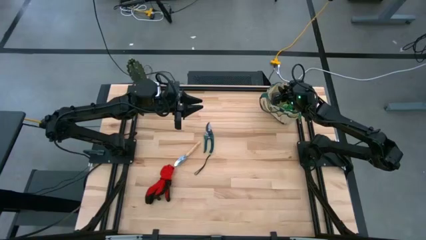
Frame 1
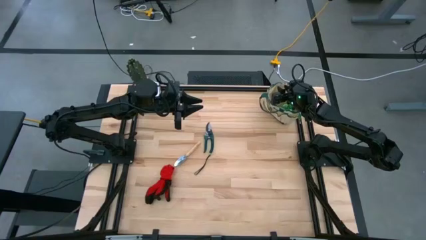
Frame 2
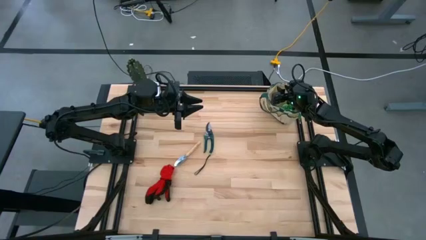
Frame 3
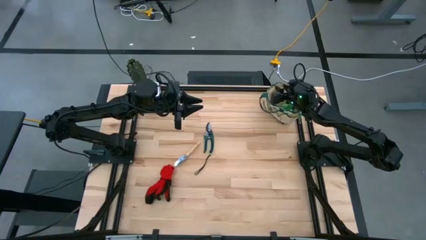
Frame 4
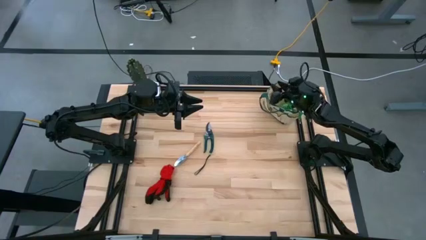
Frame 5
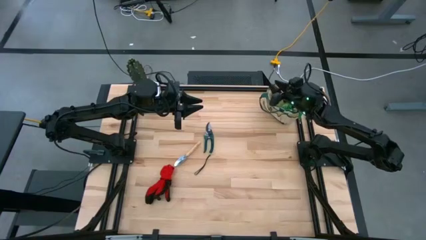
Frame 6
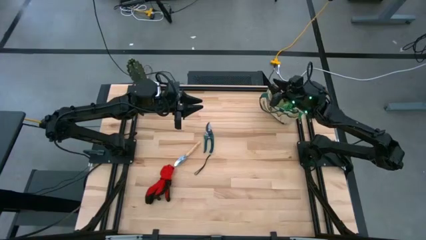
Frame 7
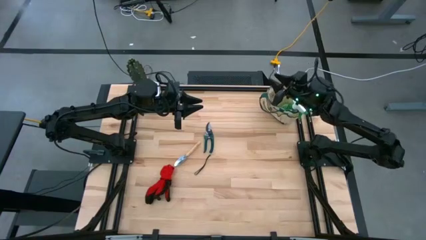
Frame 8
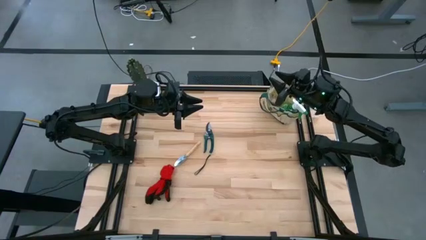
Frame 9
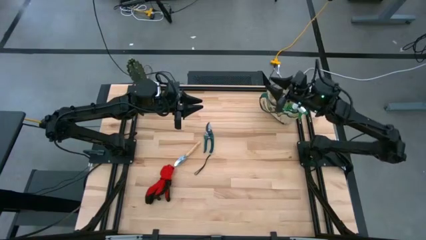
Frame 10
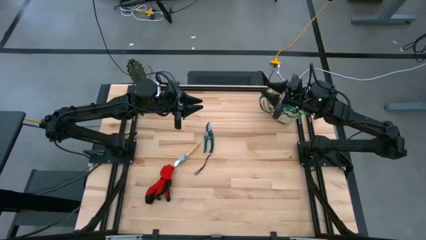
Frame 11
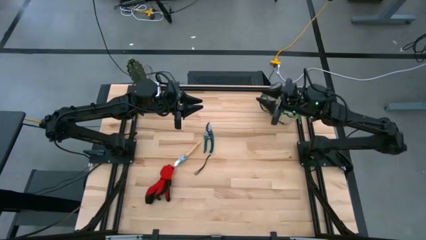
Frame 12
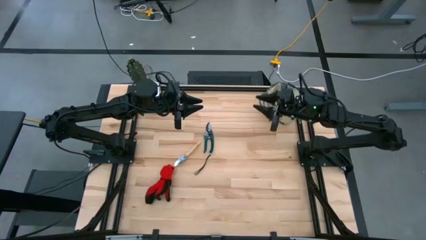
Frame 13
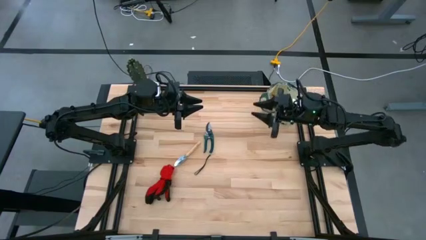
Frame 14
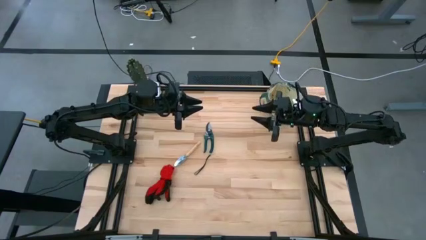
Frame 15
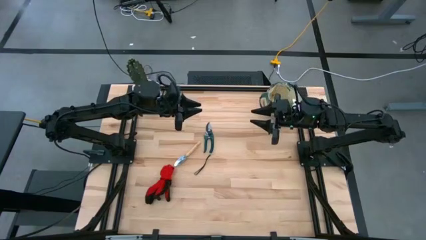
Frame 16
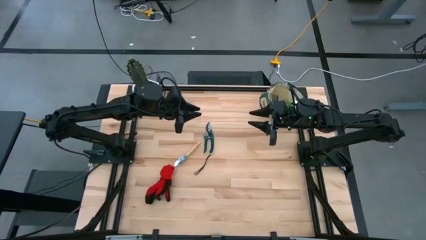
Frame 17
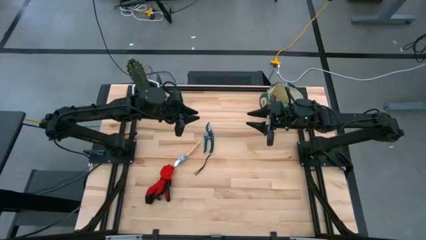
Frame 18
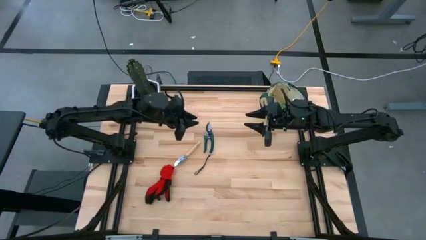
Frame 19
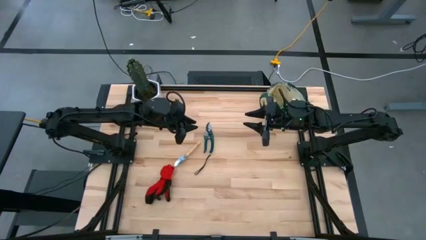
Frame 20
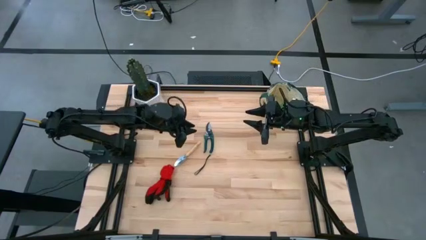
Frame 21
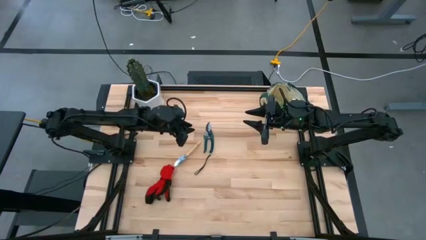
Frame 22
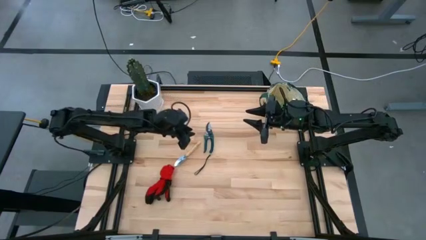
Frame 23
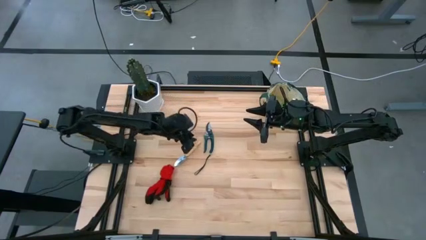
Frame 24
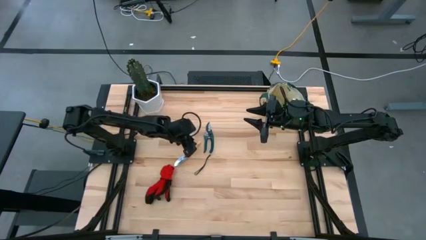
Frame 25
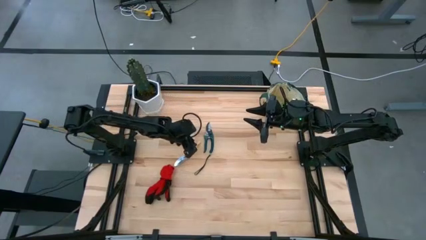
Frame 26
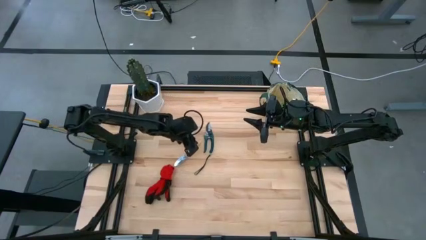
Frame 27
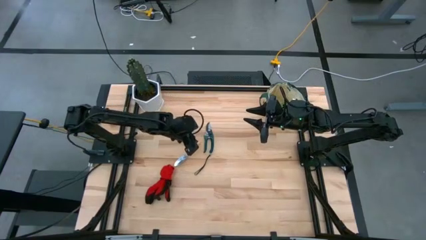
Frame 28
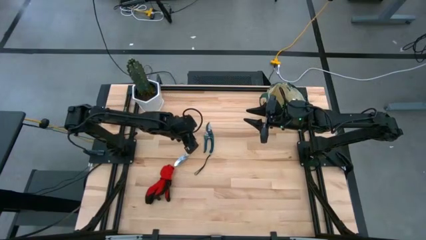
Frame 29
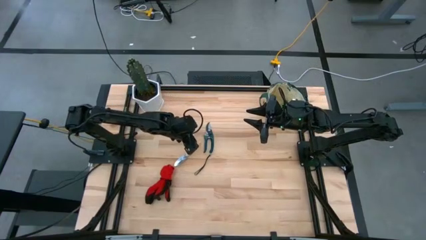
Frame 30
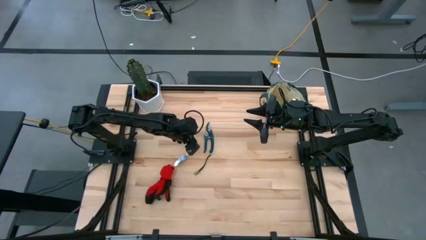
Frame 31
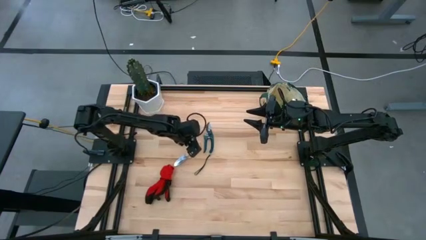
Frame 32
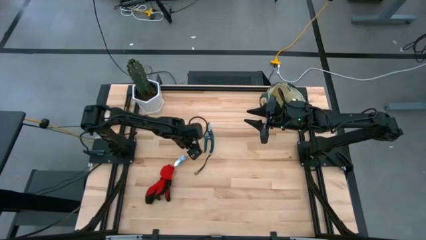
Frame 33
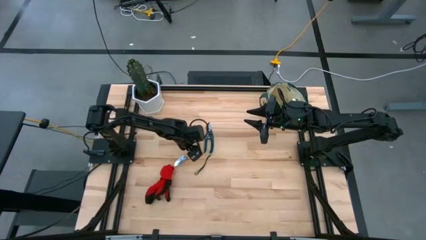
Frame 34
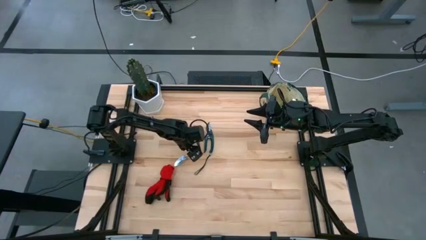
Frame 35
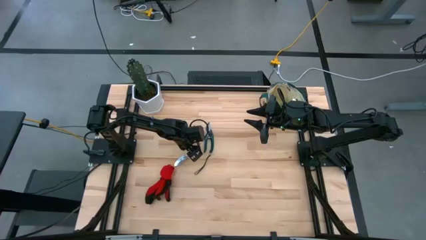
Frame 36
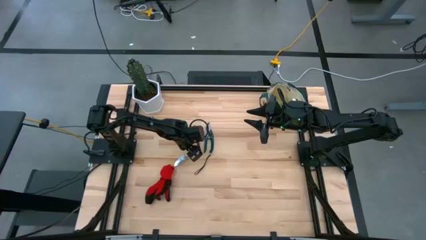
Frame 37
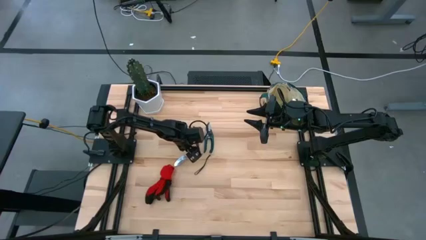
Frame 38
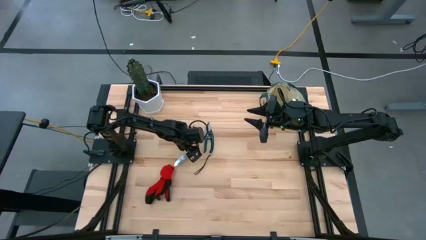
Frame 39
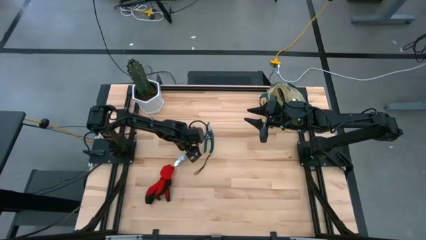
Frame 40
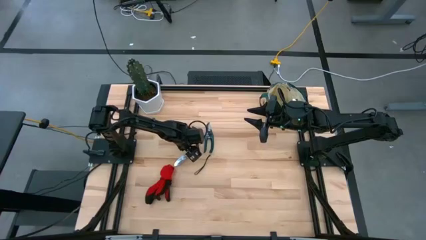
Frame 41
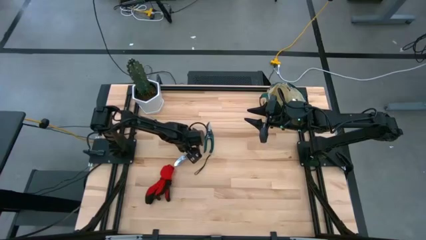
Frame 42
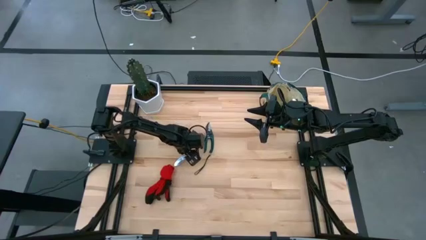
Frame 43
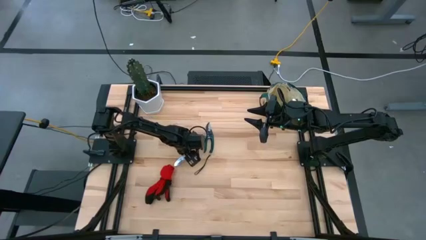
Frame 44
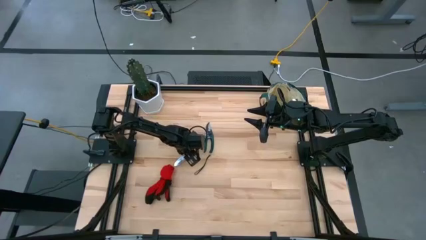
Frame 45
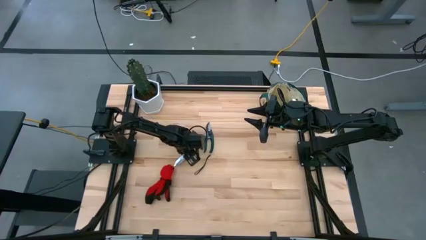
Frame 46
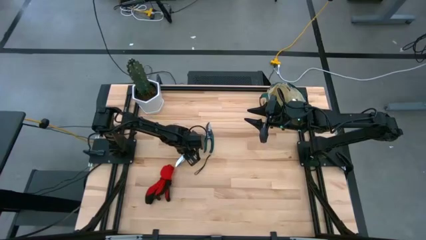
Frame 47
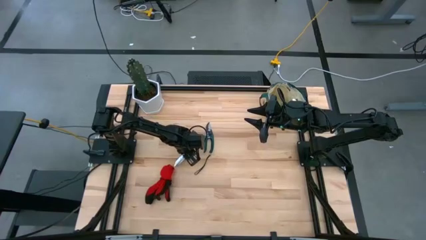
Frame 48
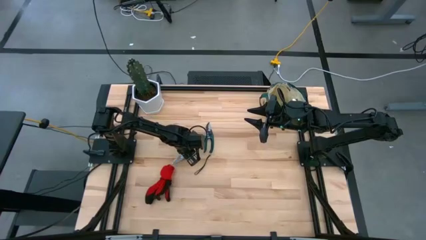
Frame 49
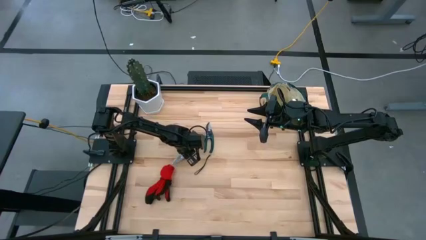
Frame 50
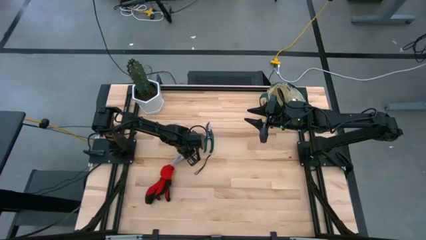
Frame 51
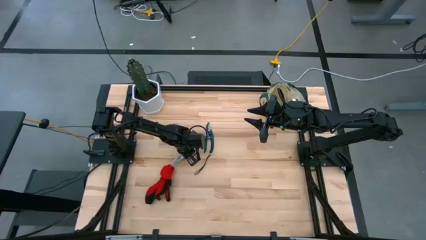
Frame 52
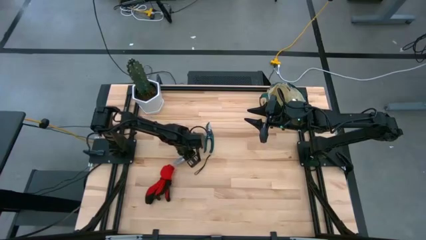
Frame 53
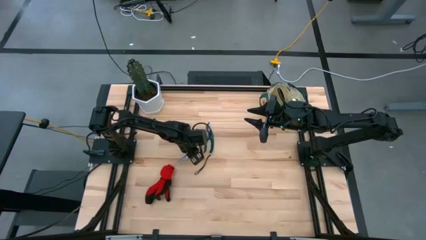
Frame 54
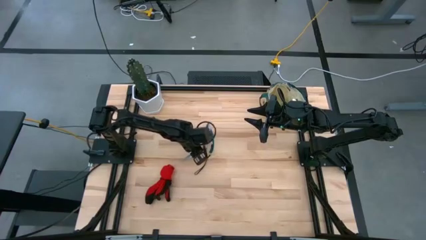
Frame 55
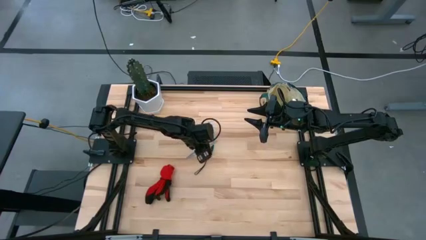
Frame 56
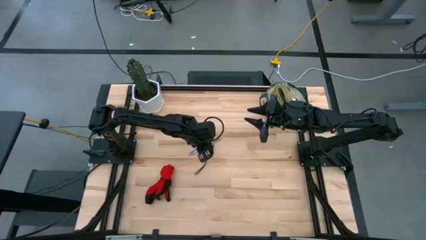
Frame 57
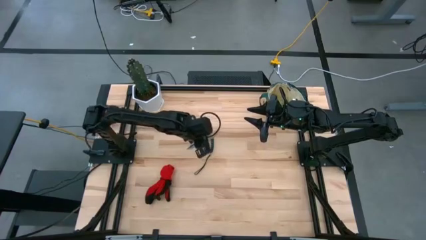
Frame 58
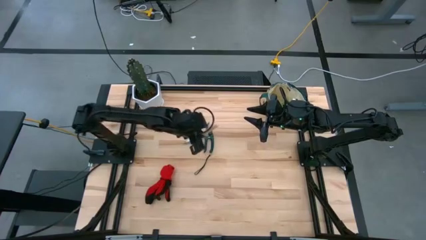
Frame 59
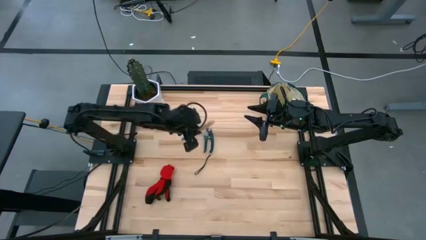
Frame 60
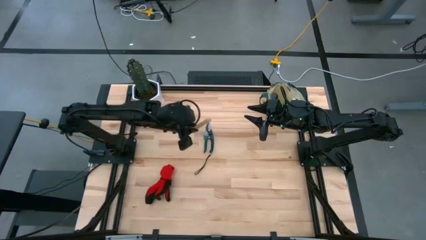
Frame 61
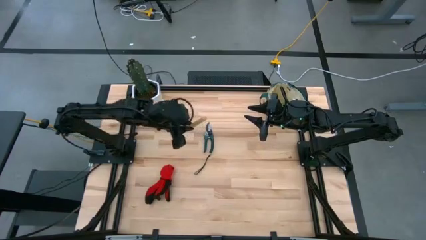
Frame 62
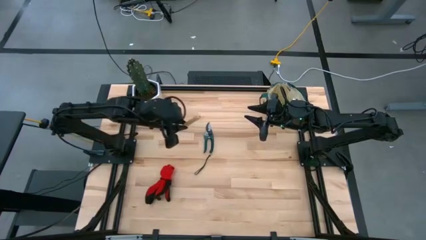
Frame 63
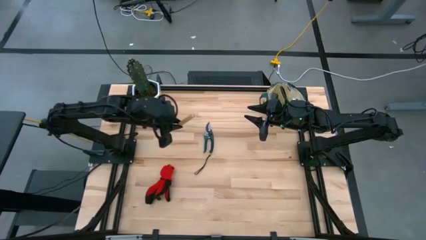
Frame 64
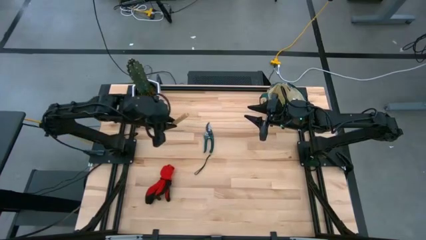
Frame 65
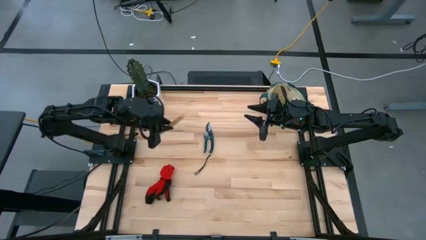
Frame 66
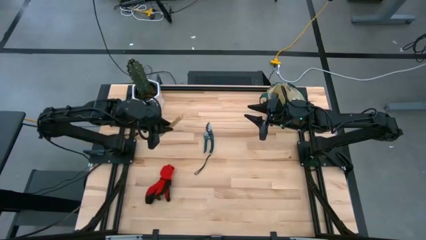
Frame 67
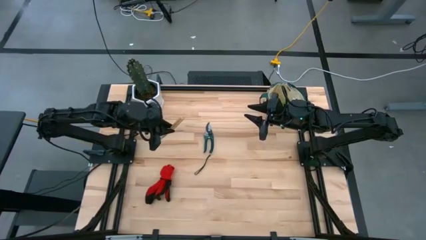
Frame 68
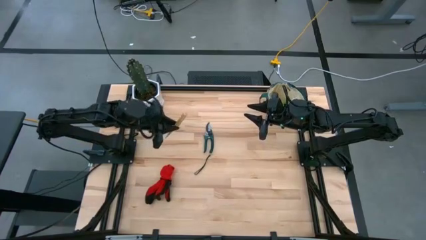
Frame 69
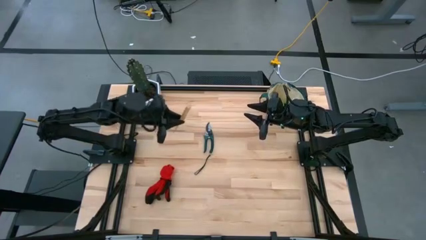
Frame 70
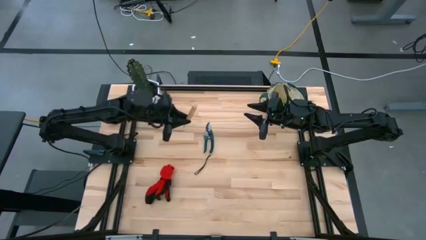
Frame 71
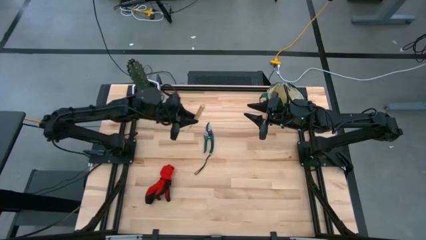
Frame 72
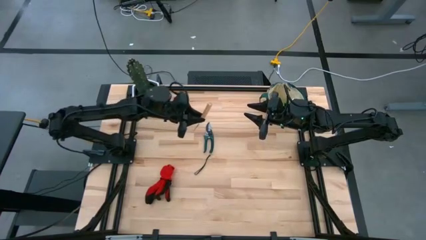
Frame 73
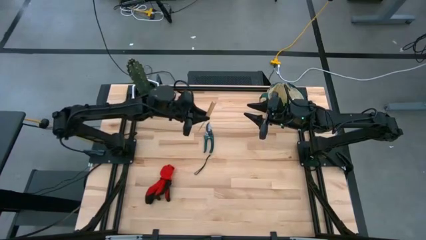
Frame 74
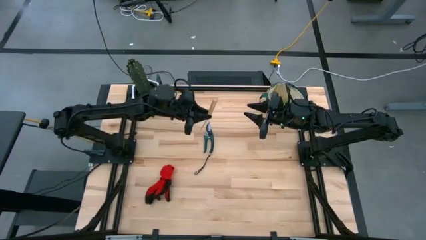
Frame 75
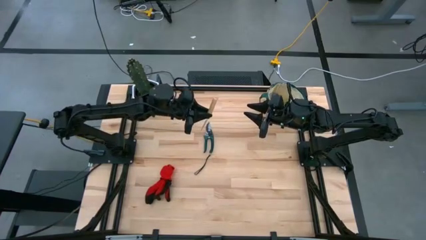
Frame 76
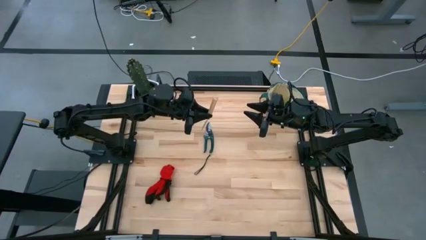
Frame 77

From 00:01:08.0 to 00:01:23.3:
Task: Pick & Place Garden tools in Gardening bag
Put the brown trowel into the white gardening bag

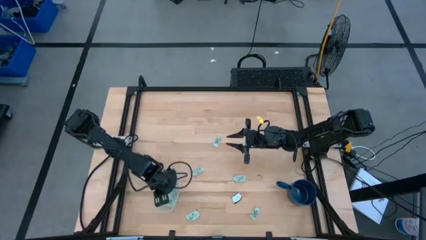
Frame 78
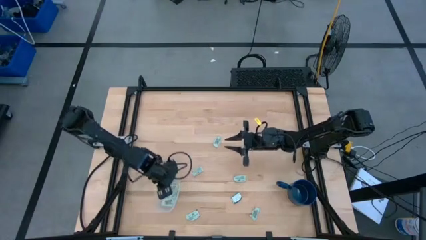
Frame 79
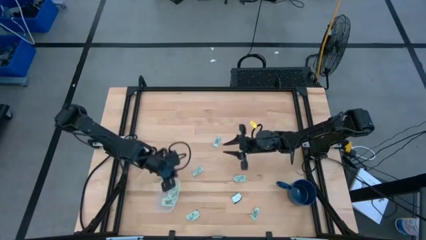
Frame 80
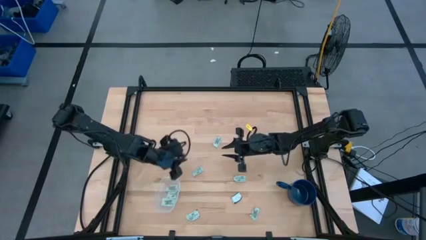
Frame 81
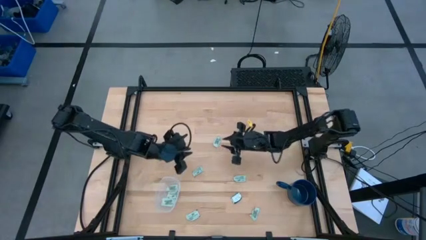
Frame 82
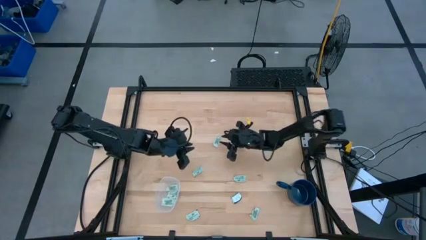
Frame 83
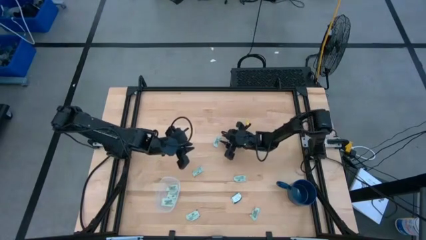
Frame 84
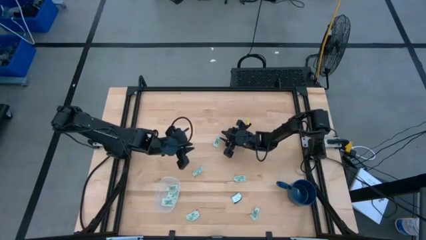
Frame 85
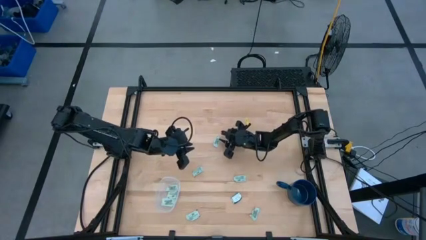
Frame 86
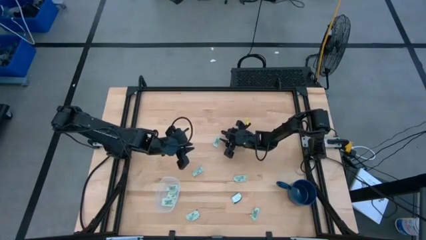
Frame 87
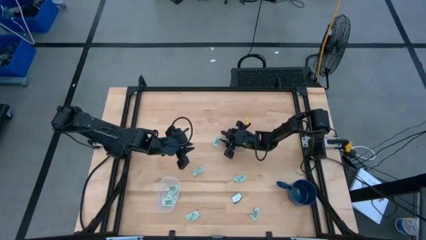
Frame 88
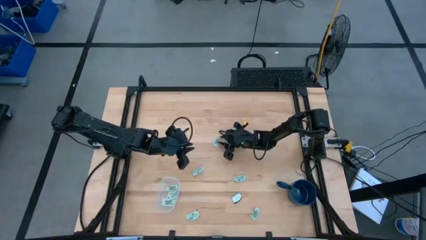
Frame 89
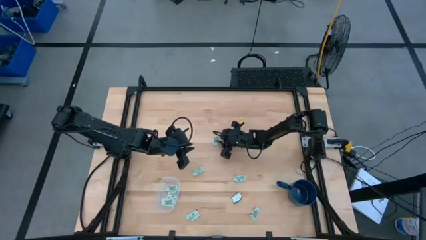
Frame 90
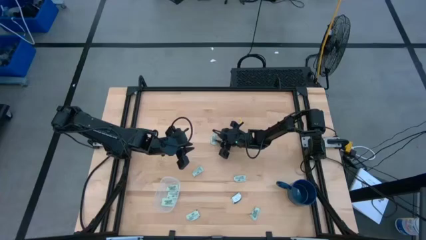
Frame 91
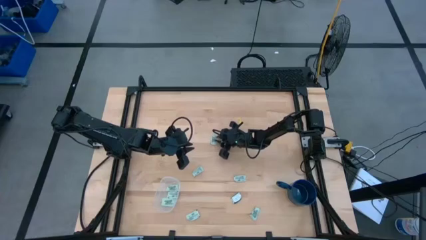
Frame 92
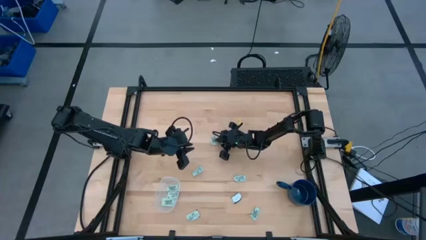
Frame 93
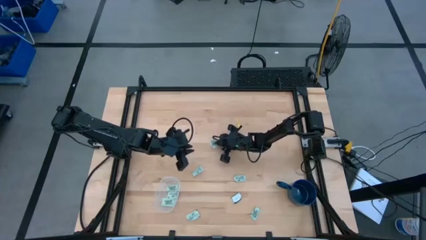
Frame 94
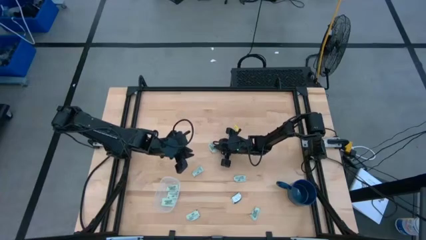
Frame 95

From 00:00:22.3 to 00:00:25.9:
Task: Pick and place Stevia / Truvia into bins
Put the stevia packet into the transparent container
